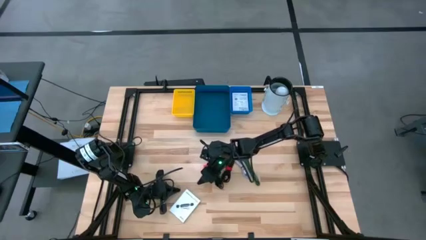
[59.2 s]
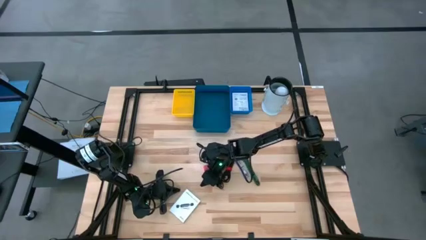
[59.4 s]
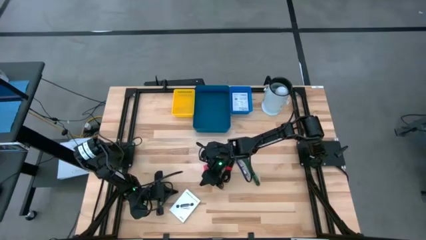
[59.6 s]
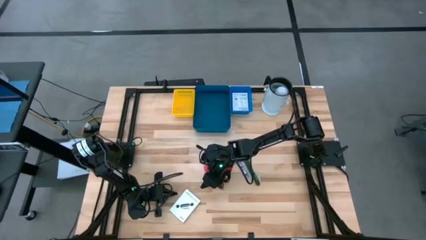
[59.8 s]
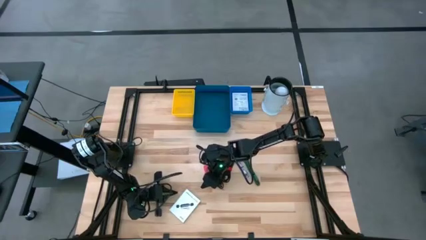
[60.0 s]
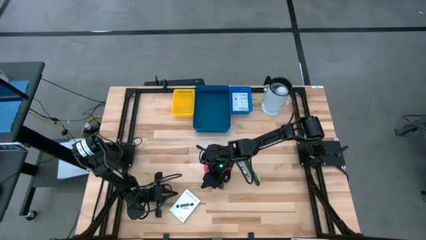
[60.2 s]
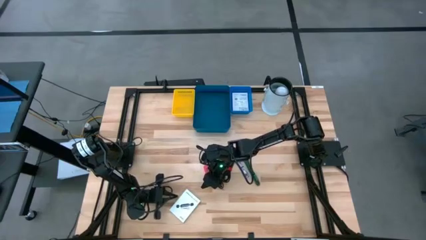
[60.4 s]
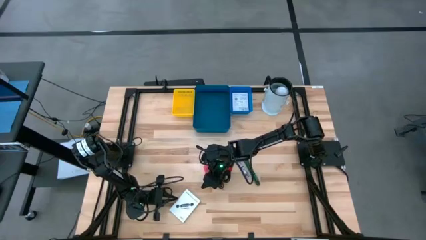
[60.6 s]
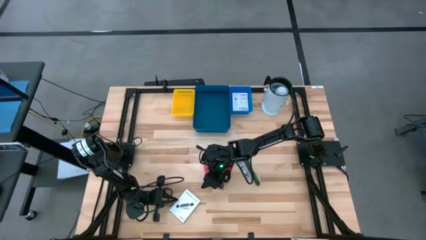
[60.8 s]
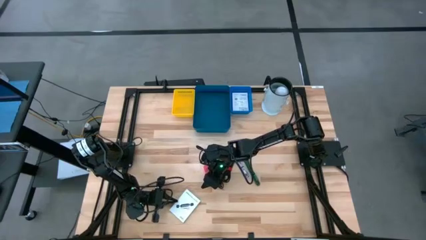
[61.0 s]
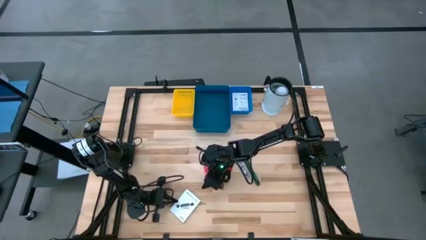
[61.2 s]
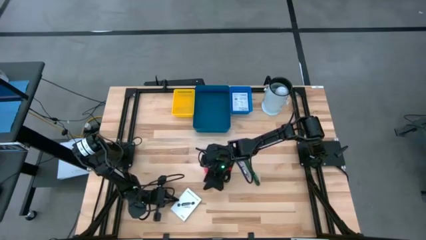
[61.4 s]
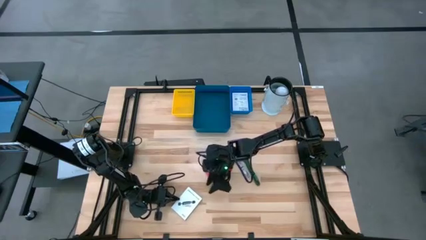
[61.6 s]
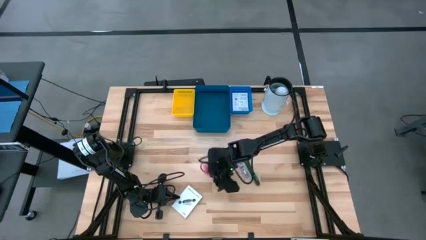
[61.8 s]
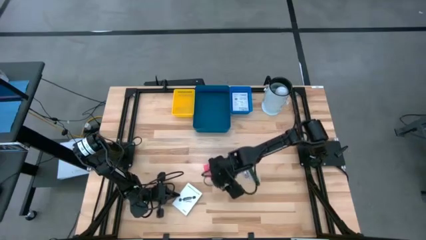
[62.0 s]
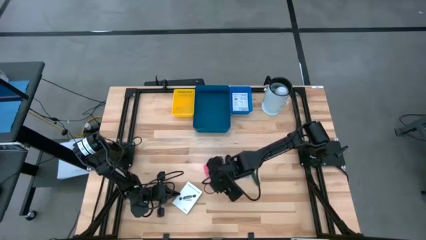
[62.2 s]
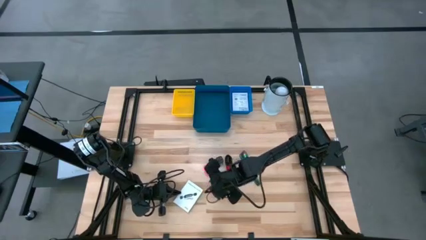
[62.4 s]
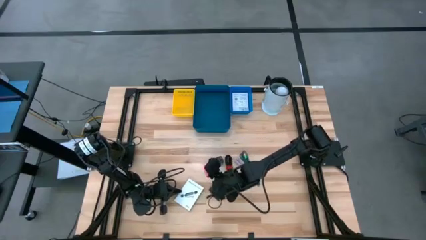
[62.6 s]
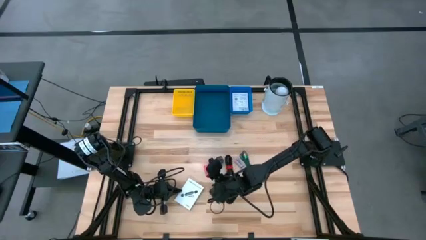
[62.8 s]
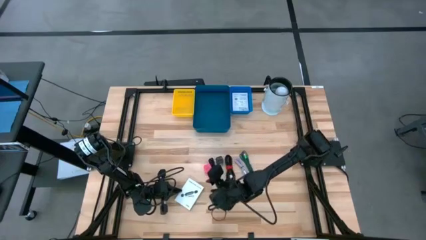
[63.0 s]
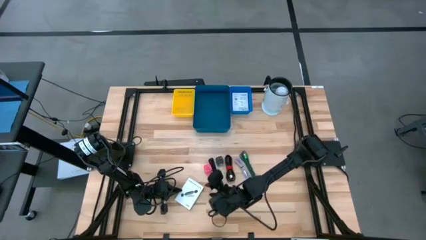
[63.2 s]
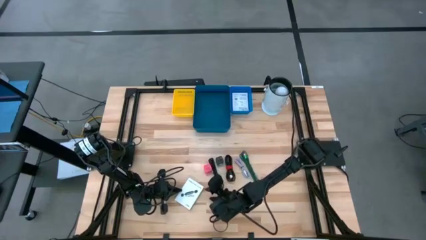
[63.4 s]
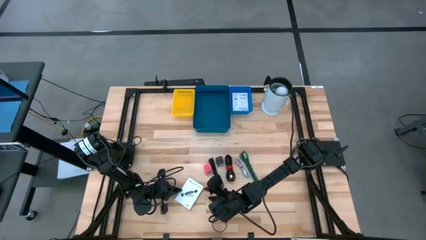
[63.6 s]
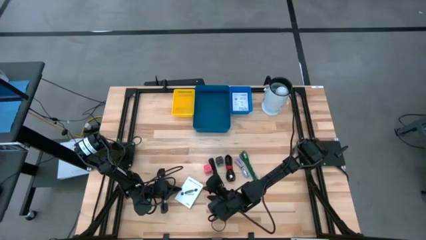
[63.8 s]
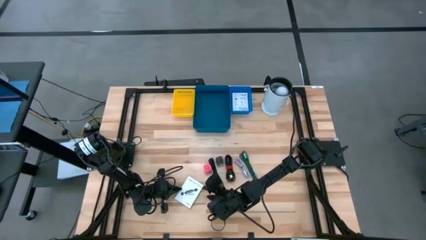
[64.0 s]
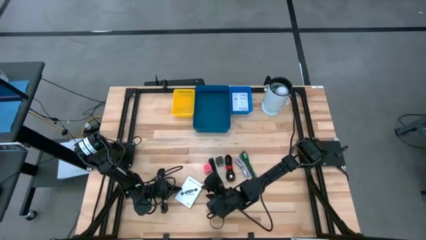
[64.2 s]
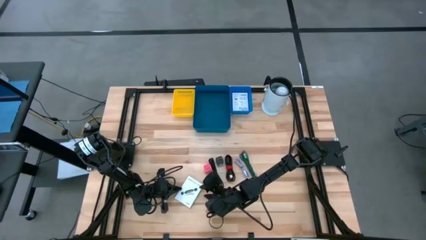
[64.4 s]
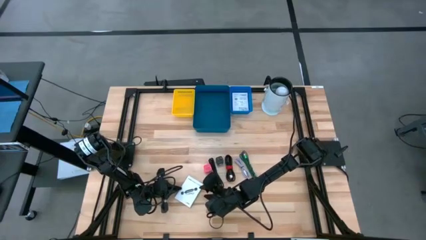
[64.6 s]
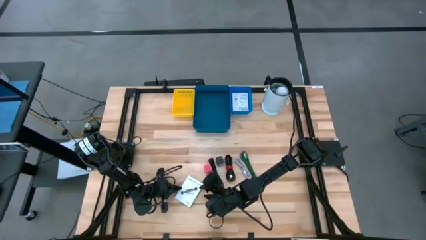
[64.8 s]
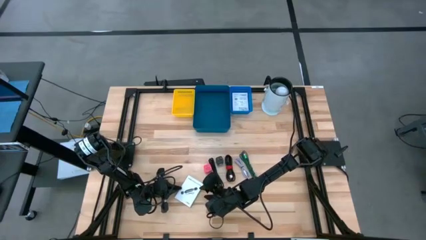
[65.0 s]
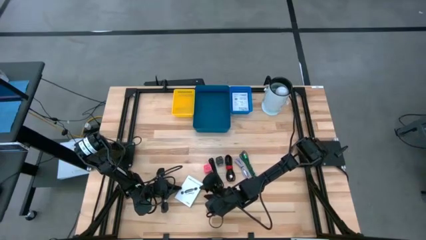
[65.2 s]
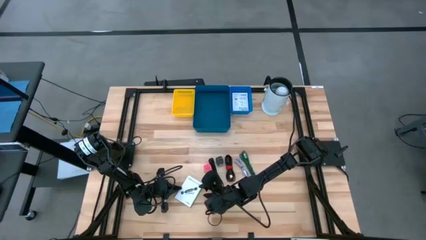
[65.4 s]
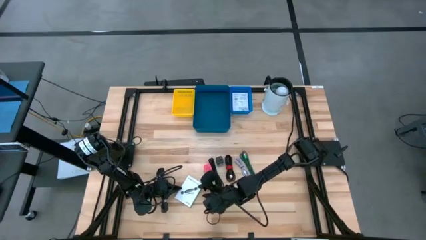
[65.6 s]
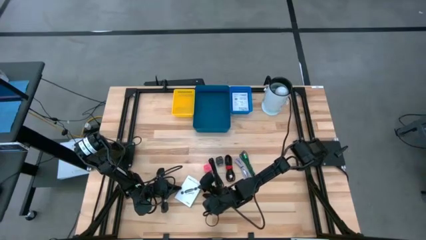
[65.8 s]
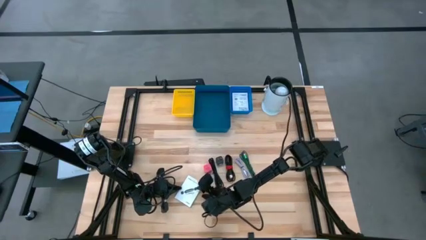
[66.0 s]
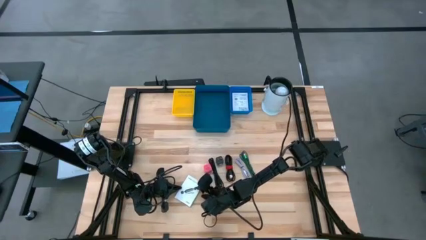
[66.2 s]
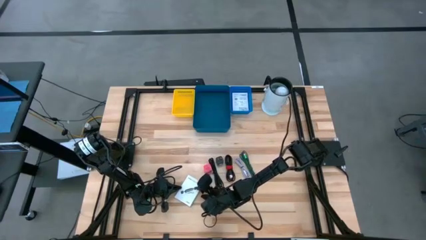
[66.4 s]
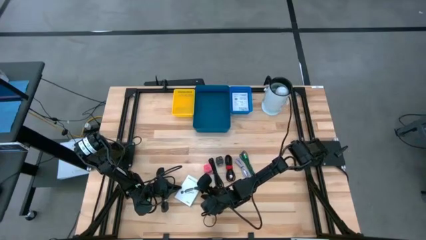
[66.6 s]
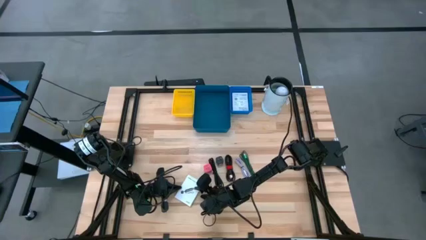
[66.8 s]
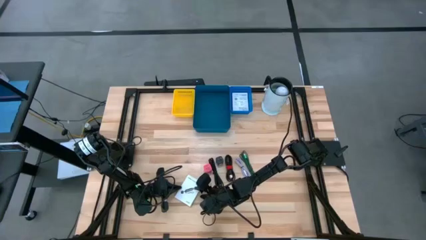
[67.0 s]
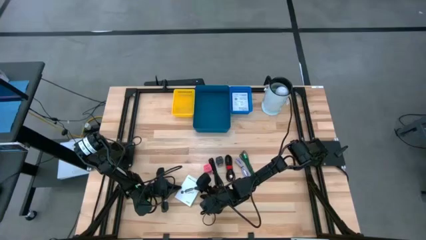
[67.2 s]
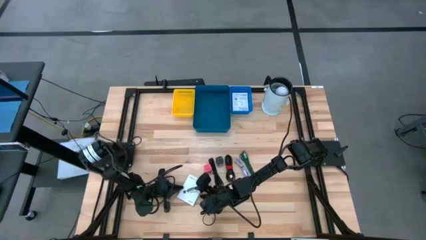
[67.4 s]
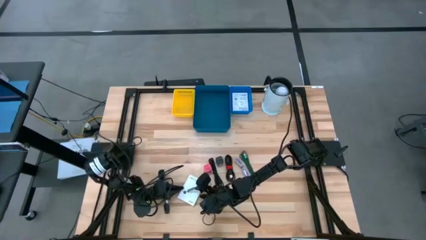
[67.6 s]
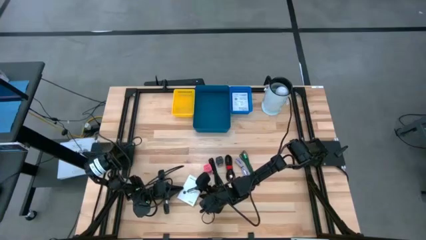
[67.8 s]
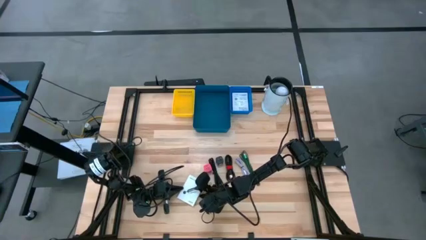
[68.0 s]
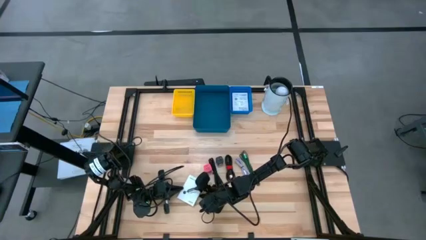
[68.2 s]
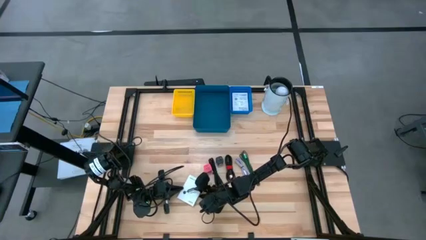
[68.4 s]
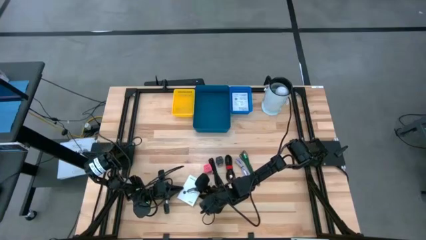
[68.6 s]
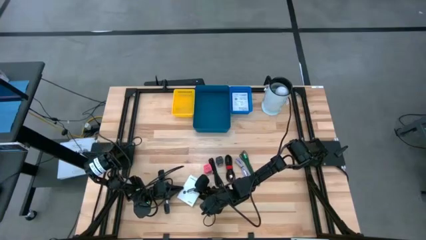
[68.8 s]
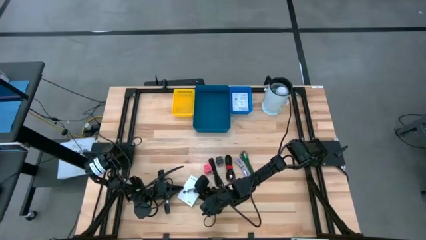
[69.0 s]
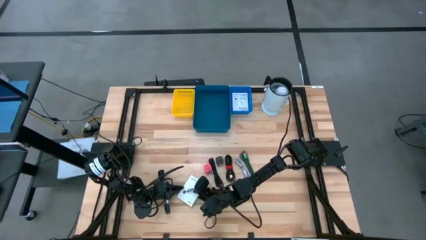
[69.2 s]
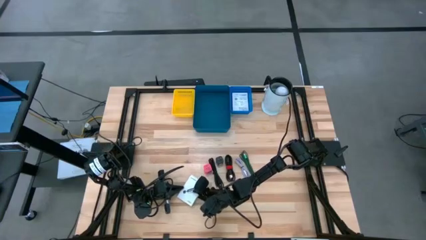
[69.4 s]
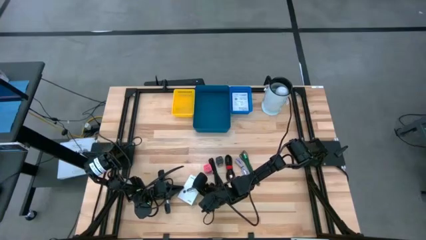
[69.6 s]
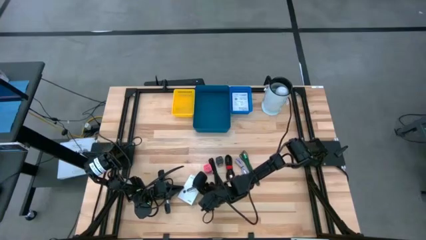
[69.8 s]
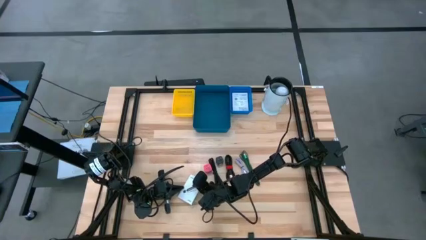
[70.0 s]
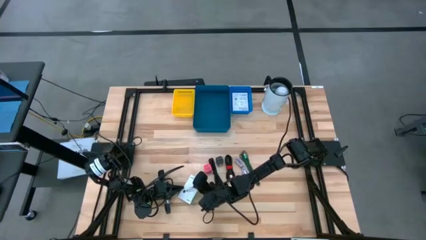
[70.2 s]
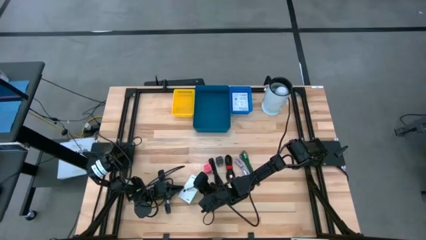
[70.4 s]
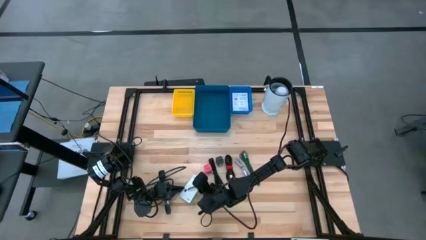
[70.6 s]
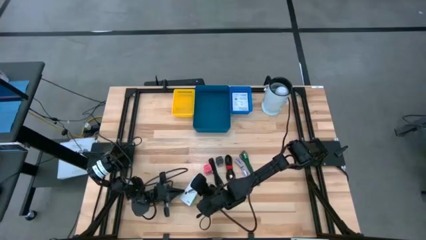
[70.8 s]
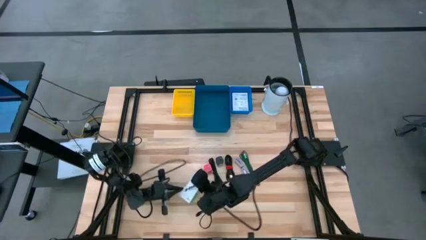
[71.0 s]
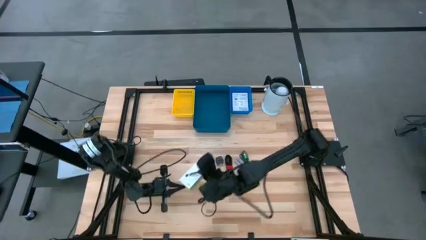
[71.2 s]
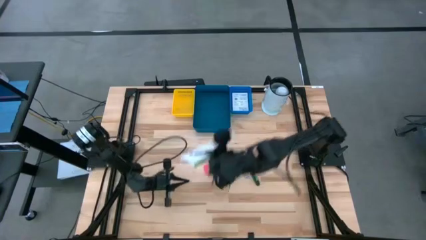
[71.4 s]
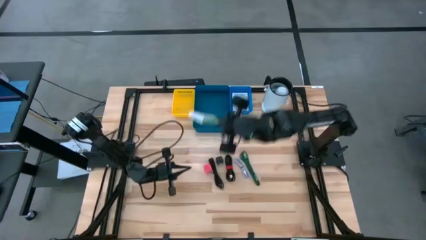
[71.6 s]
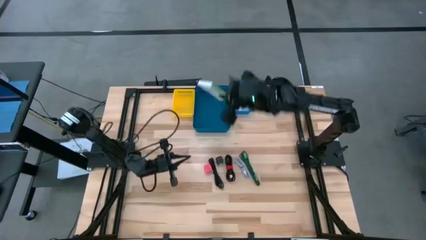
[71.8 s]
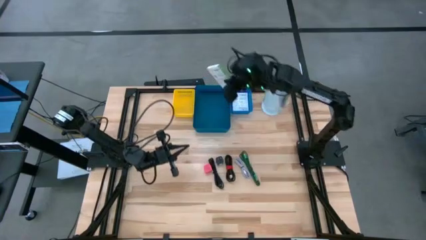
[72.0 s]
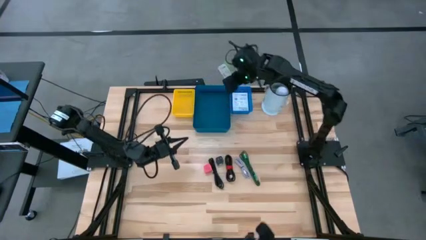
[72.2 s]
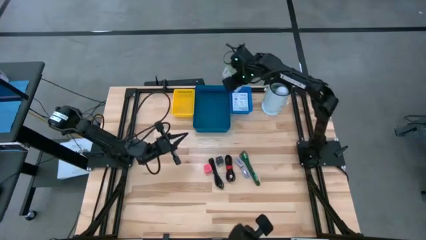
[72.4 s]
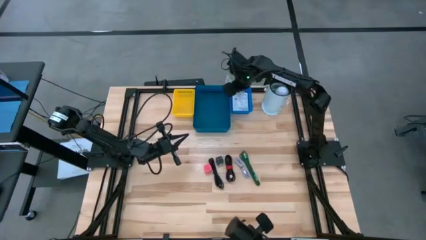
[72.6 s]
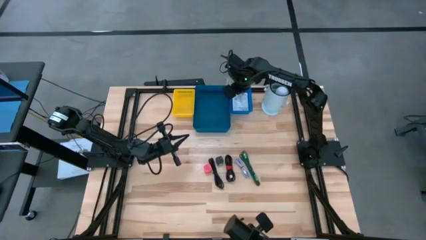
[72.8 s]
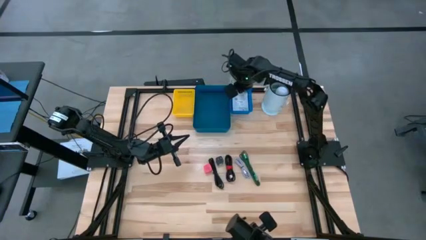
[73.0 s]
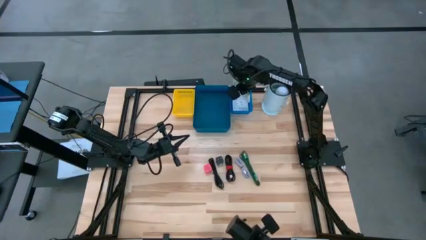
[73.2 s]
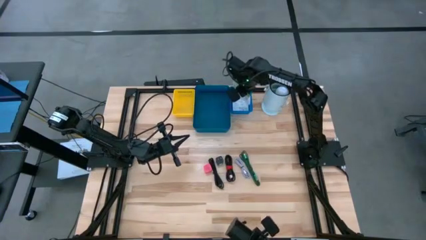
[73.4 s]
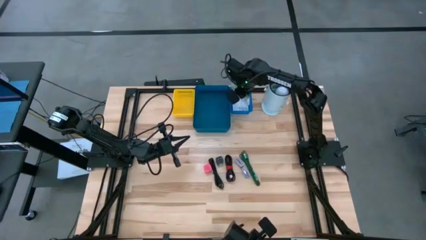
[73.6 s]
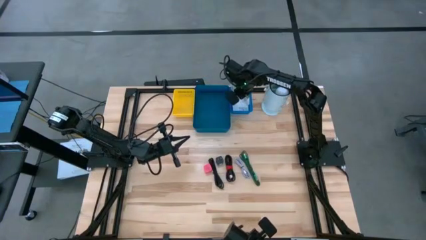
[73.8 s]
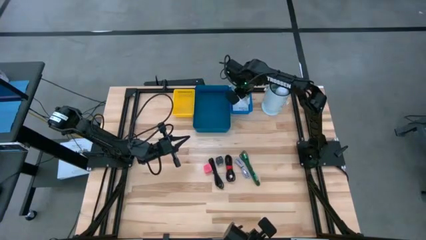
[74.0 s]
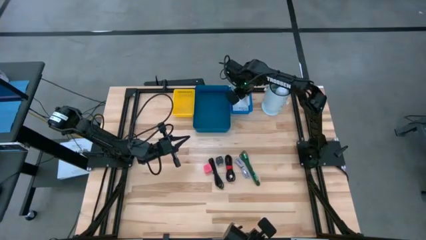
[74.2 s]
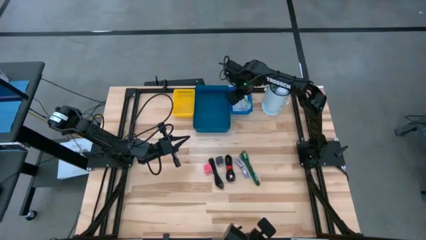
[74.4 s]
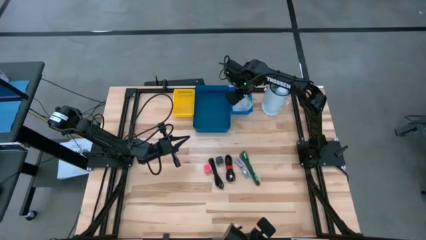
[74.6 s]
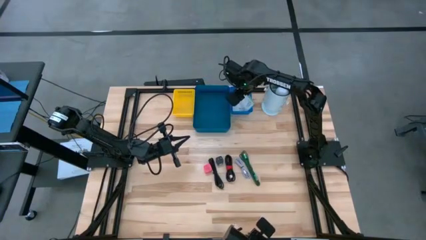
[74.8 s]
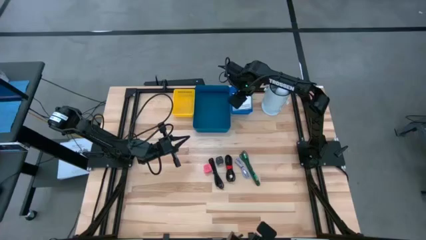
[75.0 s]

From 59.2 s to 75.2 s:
Task: Pick and place items into bin
Put the white card reader box into the blue bin
